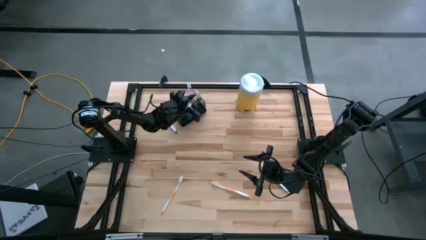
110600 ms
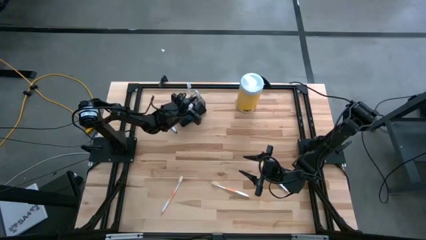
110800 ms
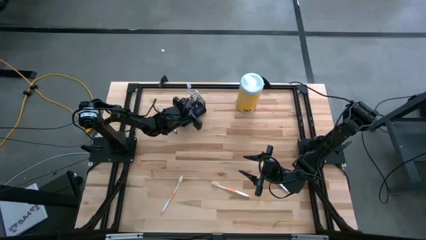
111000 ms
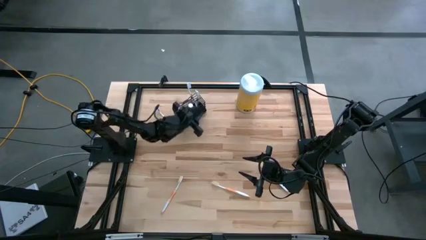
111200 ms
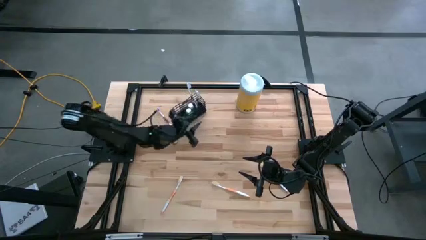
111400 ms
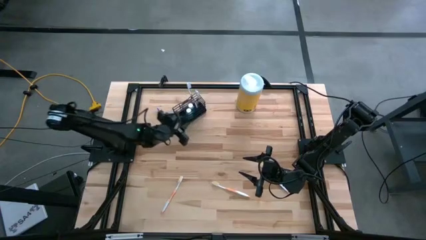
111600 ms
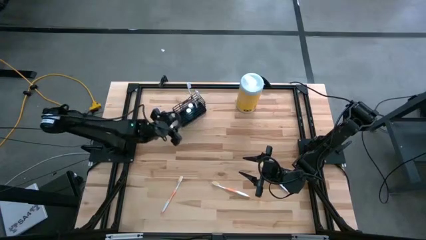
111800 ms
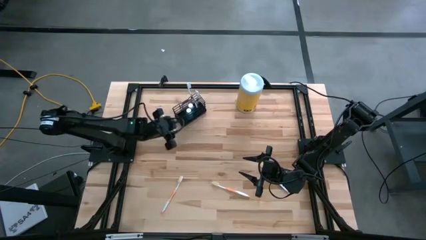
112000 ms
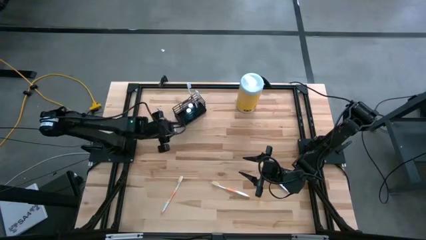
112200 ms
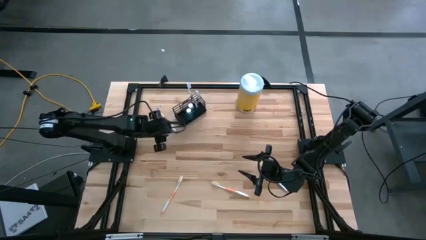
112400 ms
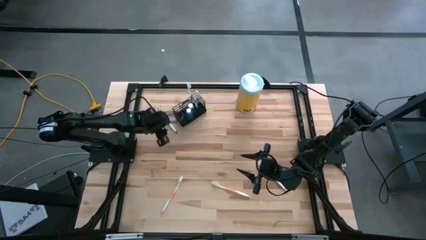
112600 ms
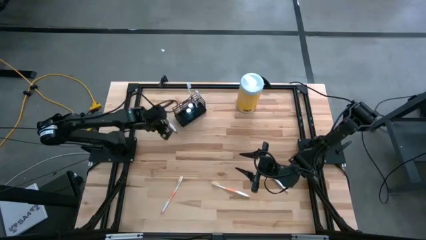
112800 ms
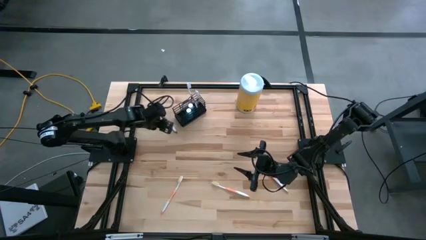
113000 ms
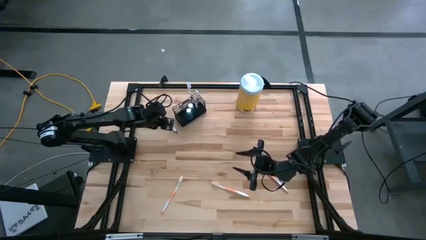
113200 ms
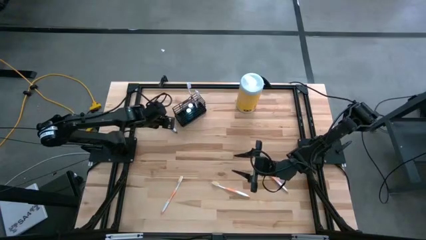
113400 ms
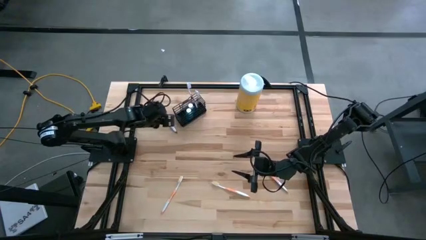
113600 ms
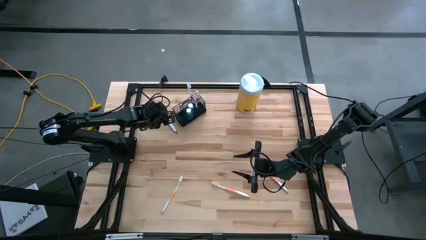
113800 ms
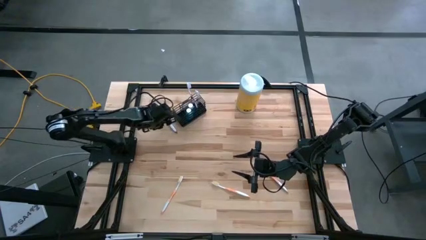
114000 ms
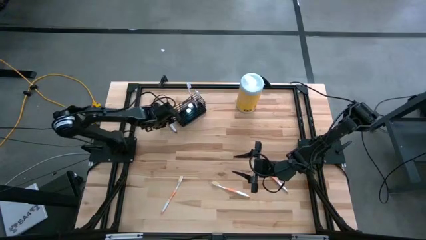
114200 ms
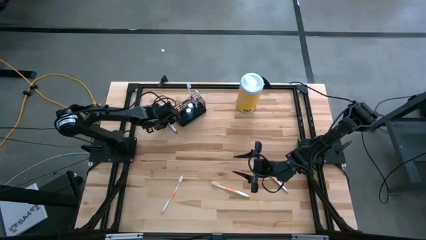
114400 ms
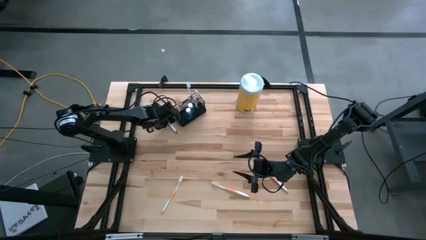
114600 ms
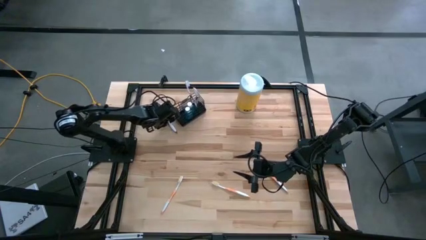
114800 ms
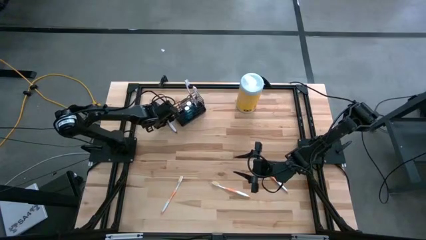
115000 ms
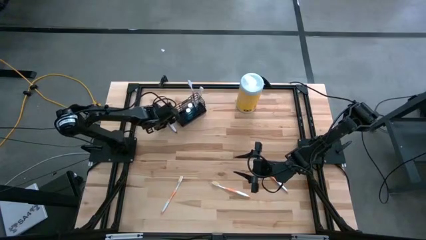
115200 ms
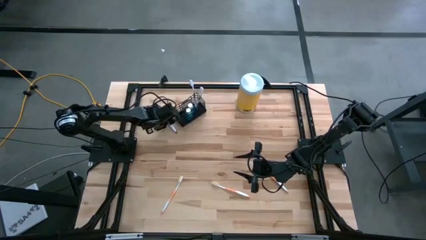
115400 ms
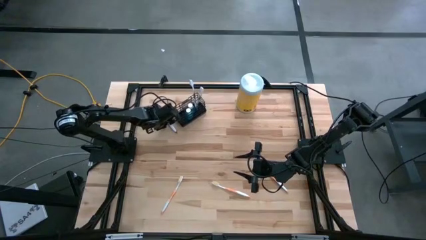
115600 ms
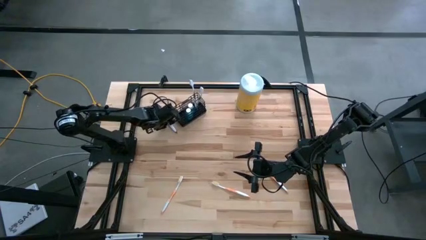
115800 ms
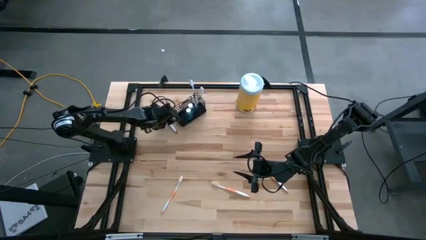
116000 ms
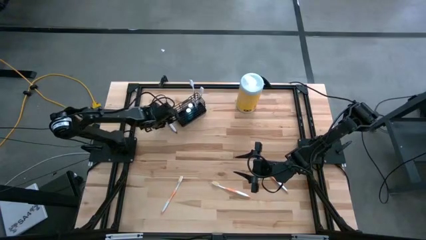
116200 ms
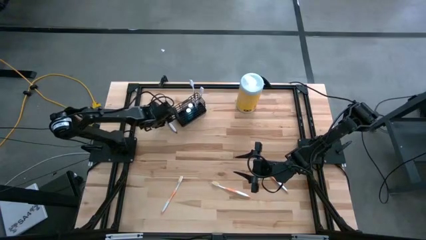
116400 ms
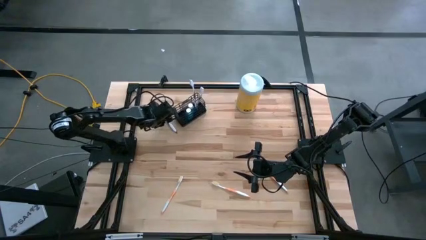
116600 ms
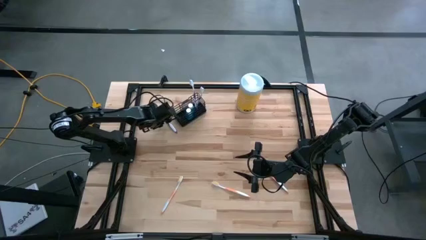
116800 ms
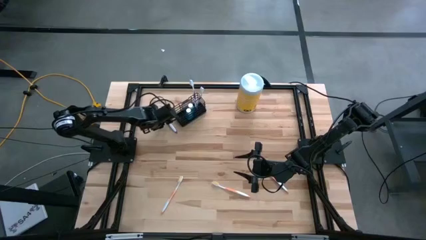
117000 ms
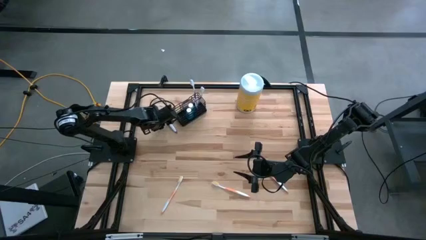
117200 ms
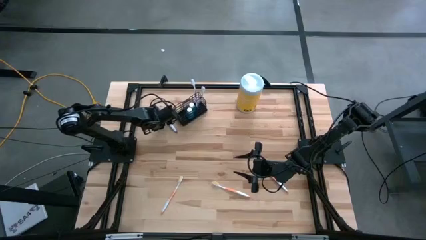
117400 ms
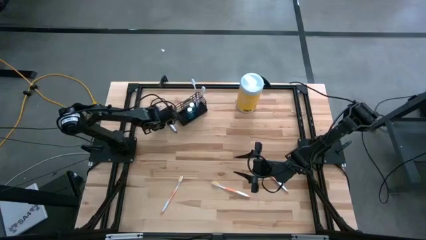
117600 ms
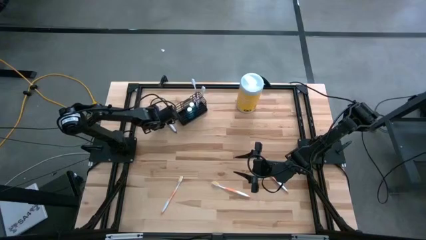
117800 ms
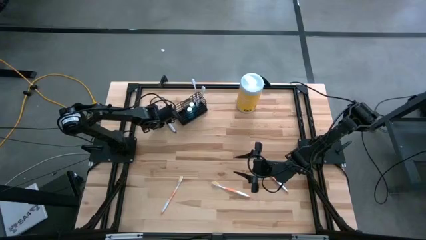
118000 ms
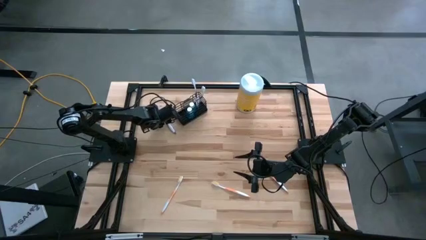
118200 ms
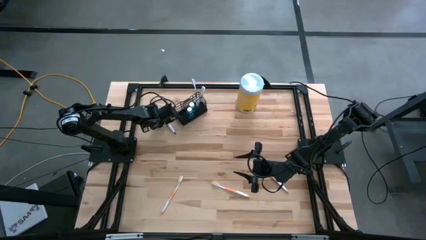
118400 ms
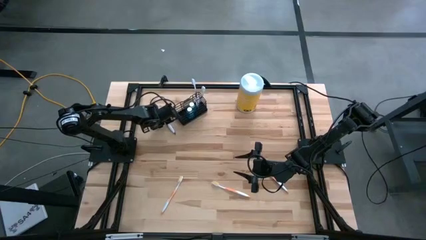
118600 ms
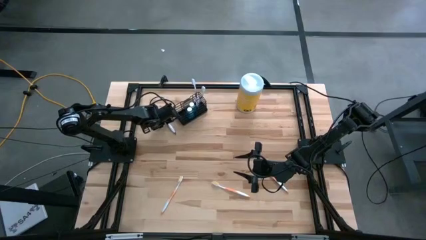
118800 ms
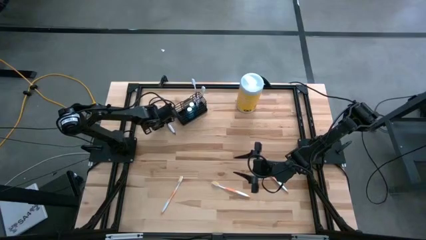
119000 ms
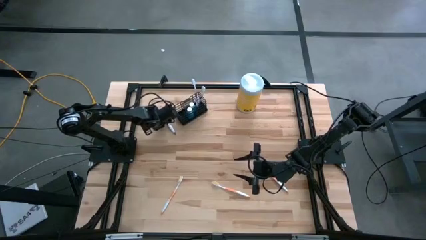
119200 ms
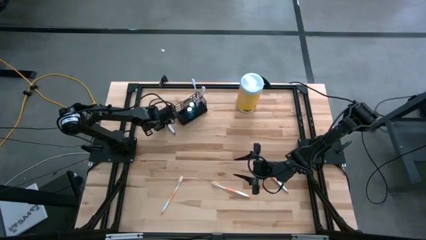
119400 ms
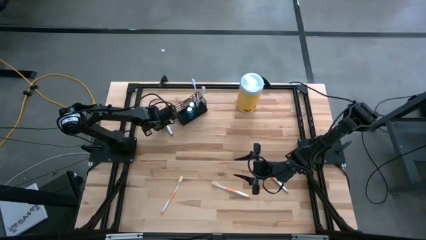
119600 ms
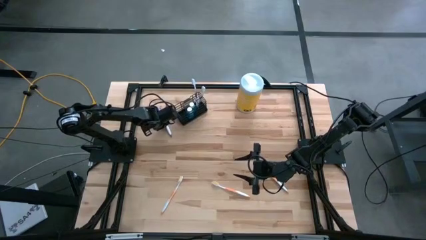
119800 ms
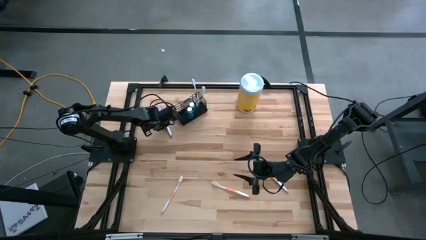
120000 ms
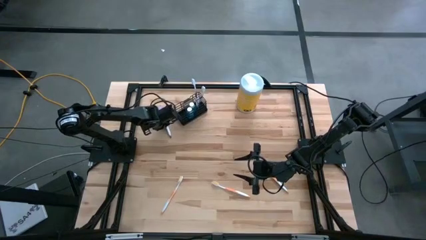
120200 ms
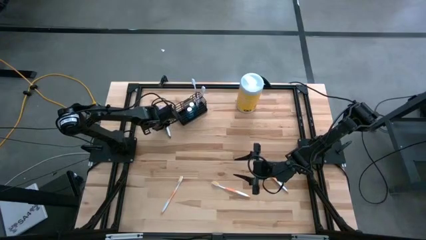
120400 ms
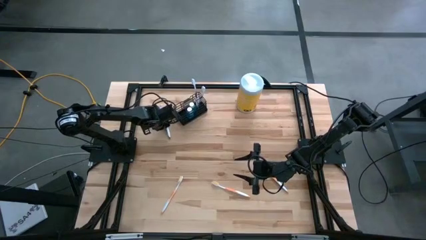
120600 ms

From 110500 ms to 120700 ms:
Task: Pick & Place toothbrushing station
Put the purple toothbrush into the right section of the wire organizer

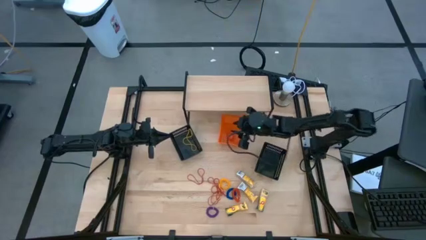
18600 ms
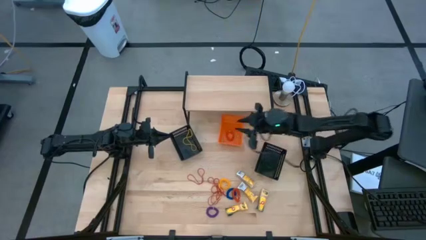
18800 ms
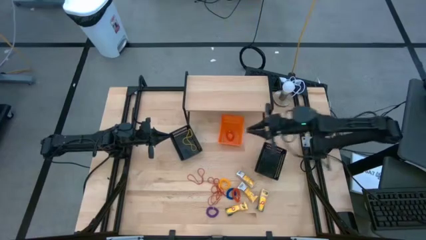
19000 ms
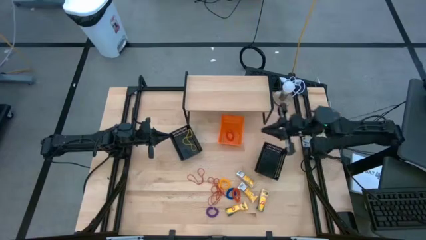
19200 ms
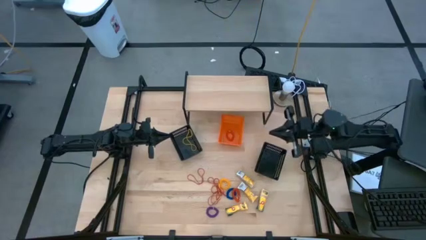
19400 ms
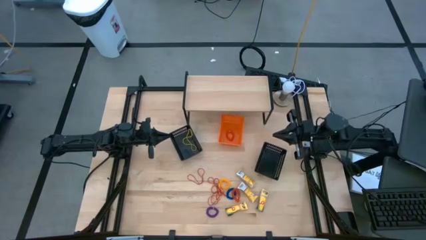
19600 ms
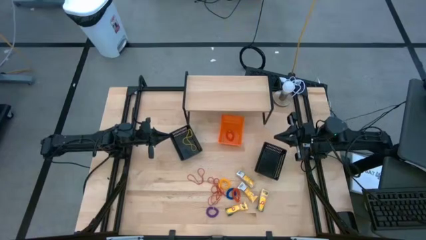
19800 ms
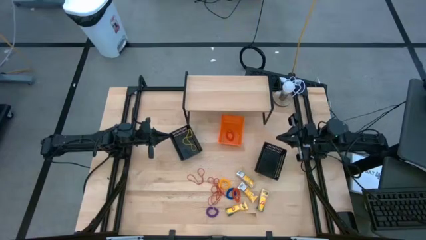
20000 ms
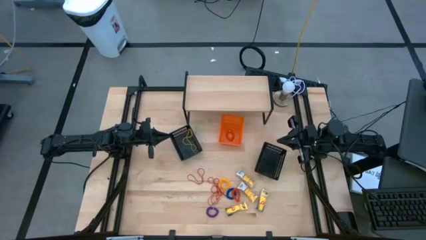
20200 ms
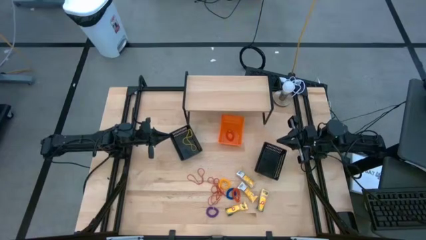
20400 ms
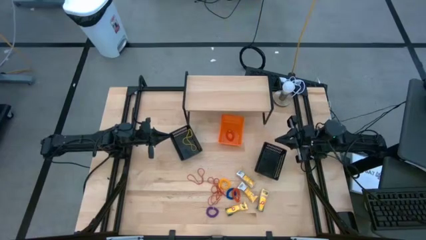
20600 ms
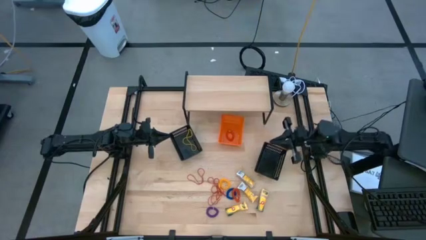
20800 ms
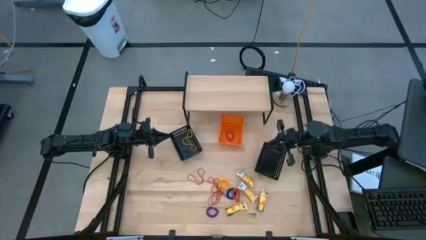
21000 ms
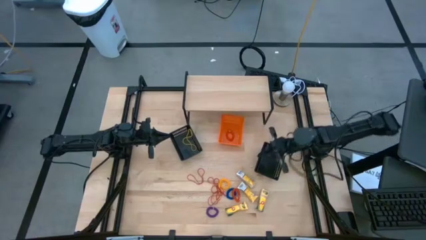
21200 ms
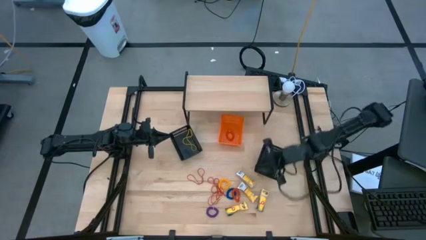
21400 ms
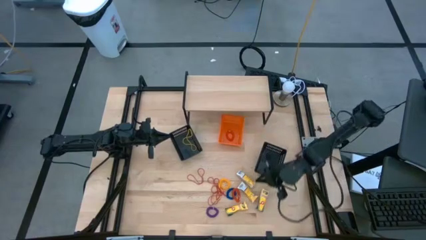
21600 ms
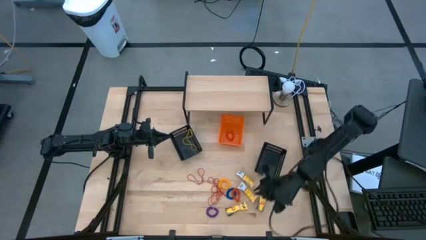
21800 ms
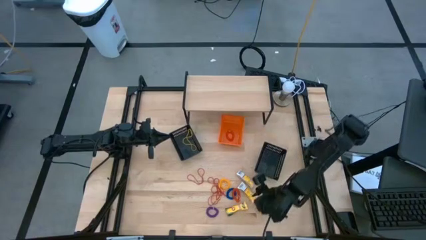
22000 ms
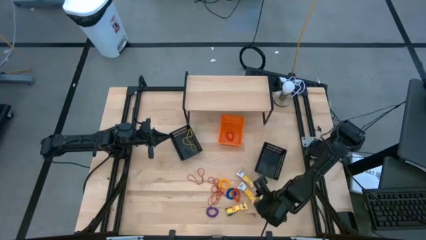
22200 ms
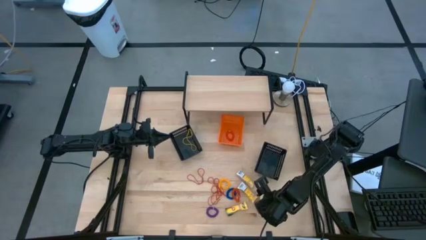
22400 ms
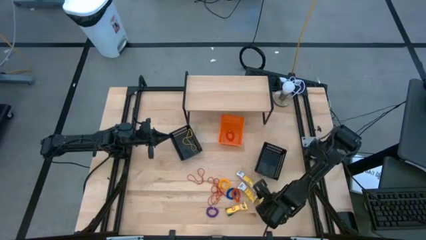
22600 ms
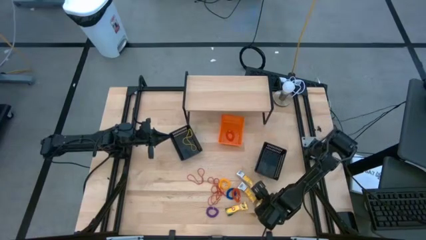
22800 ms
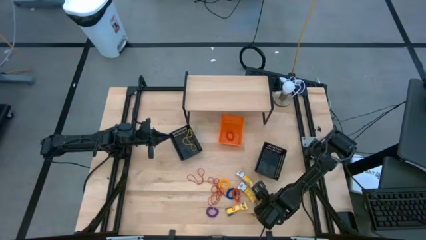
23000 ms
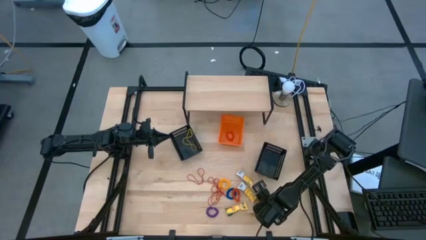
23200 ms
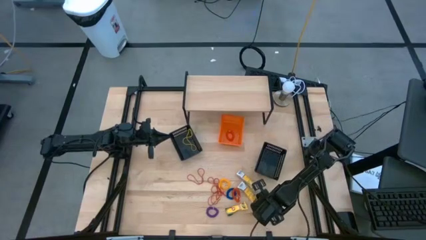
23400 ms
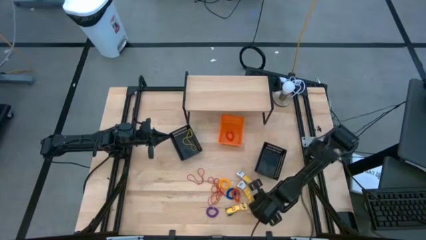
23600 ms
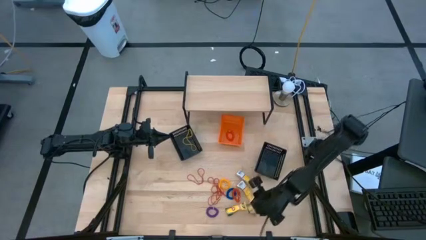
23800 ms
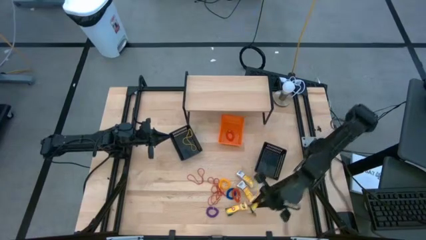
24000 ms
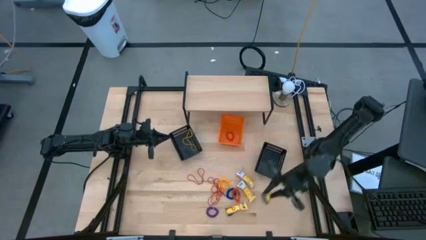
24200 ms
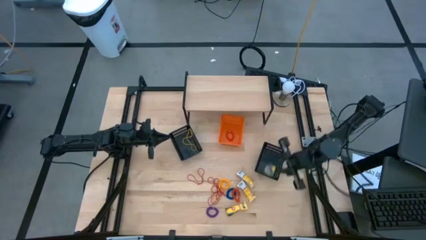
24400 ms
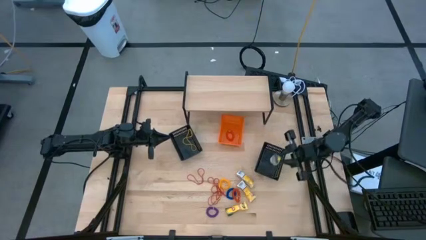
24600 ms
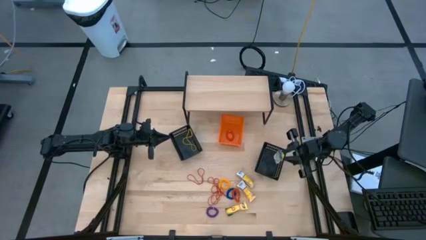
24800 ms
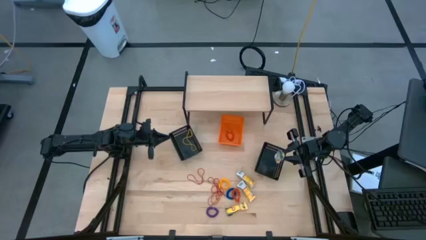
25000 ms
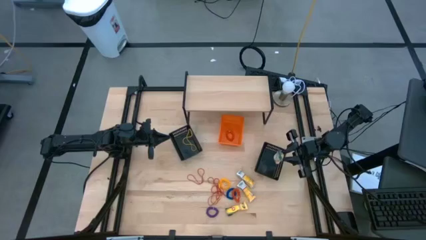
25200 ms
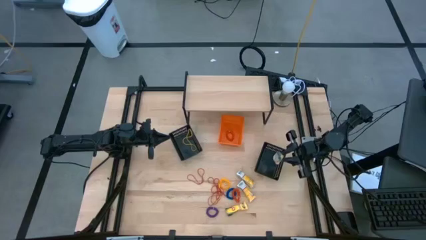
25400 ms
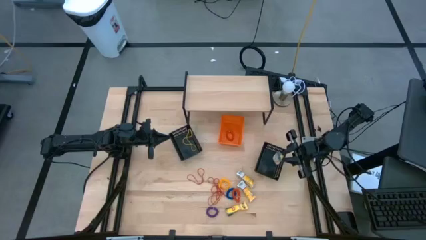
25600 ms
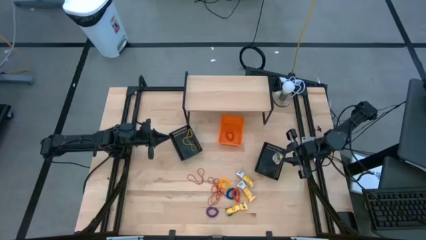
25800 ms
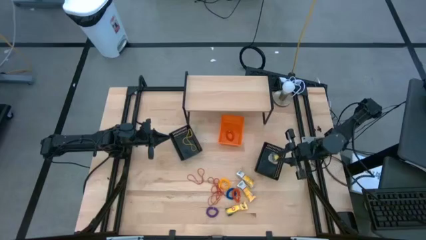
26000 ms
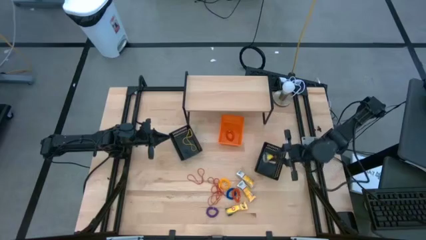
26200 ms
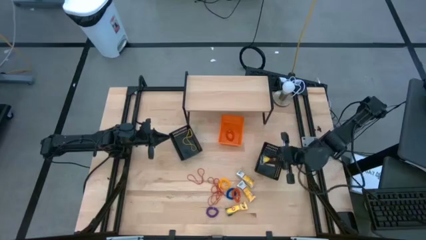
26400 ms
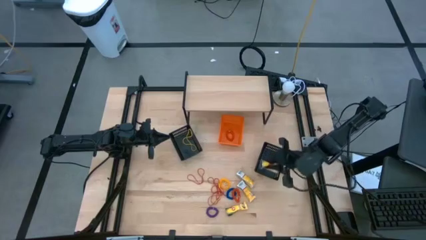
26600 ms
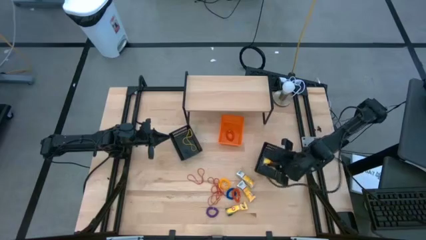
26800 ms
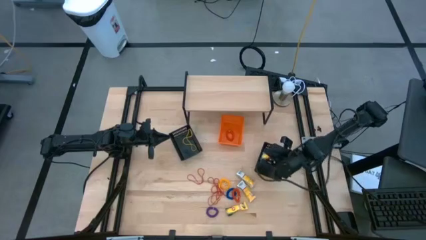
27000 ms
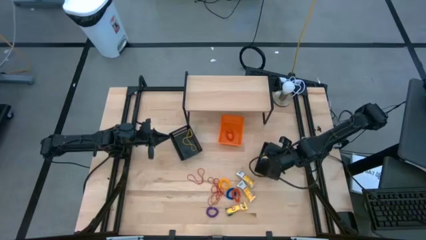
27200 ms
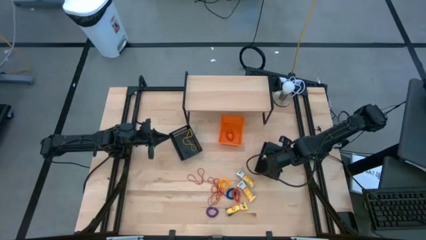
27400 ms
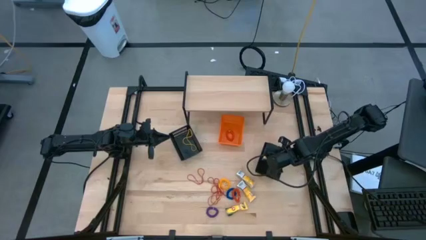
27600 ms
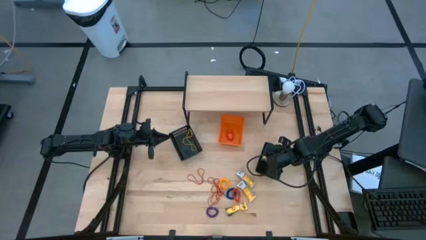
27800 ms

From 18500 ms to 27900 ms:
Task: Pick & Place Office Desk Supplies
Put the crayon box into the right black bin
